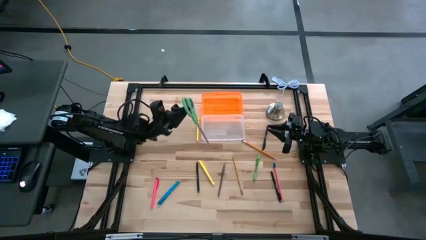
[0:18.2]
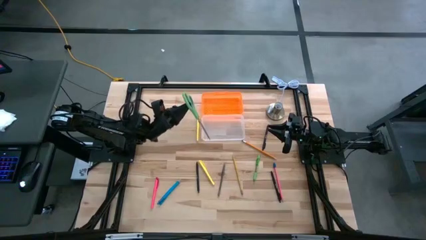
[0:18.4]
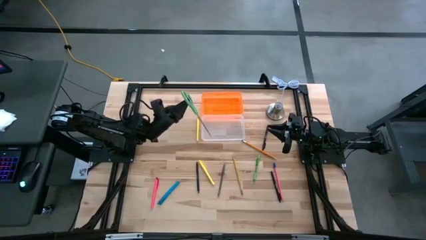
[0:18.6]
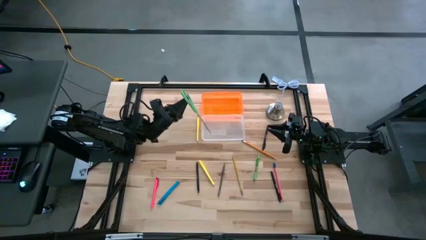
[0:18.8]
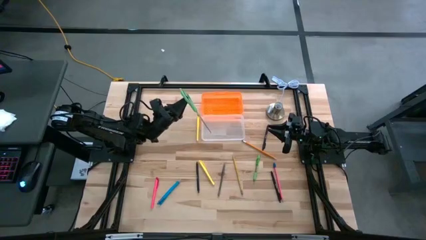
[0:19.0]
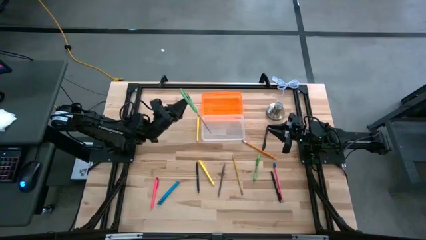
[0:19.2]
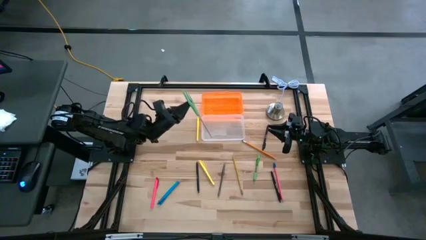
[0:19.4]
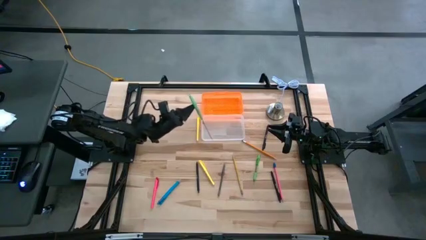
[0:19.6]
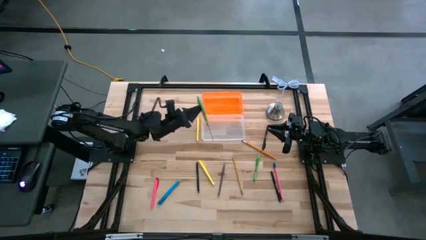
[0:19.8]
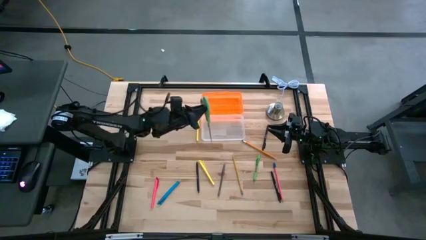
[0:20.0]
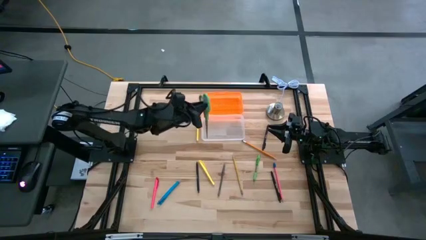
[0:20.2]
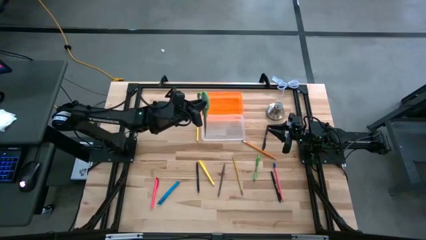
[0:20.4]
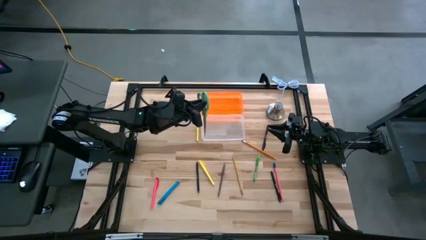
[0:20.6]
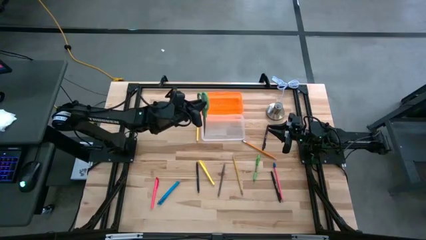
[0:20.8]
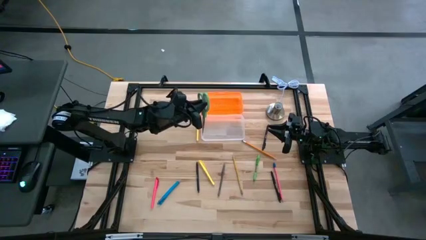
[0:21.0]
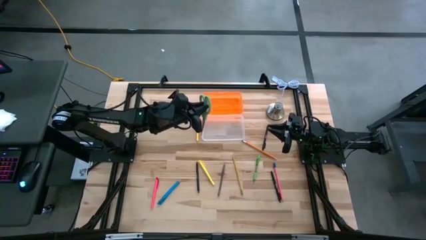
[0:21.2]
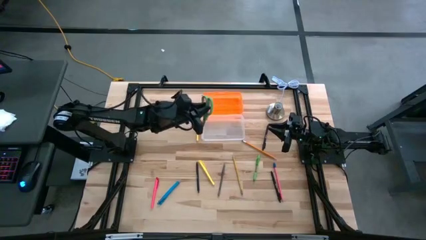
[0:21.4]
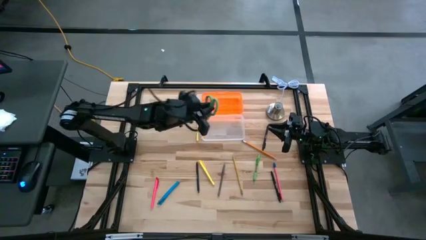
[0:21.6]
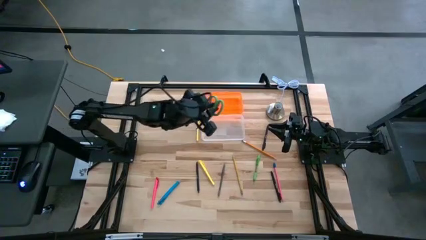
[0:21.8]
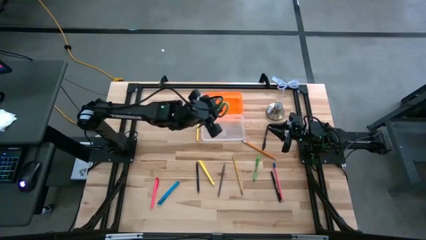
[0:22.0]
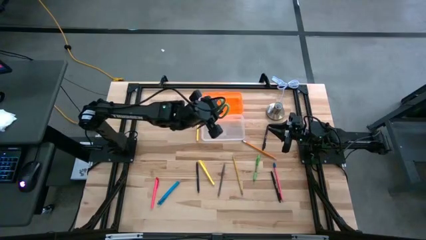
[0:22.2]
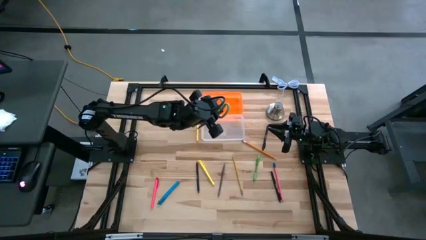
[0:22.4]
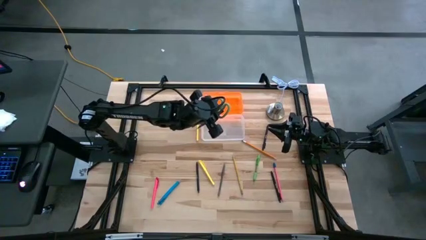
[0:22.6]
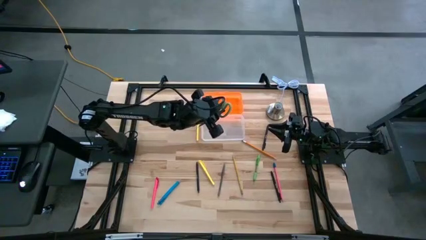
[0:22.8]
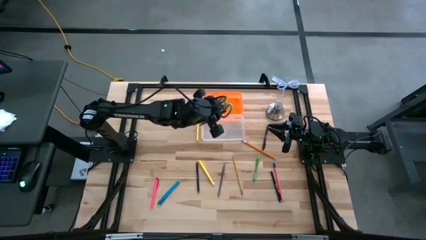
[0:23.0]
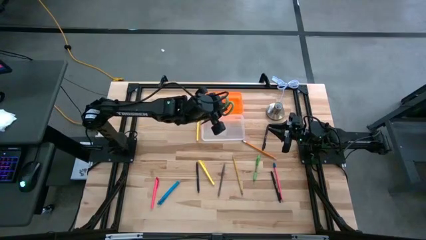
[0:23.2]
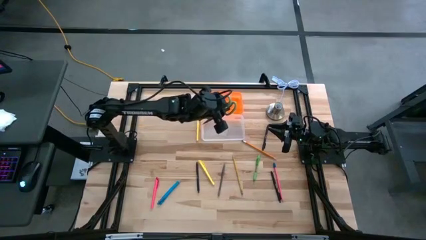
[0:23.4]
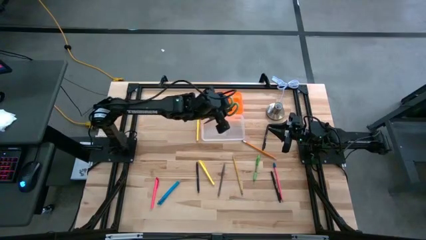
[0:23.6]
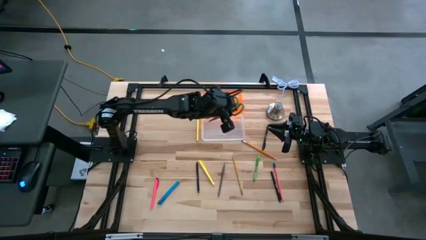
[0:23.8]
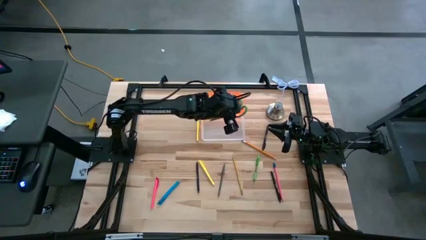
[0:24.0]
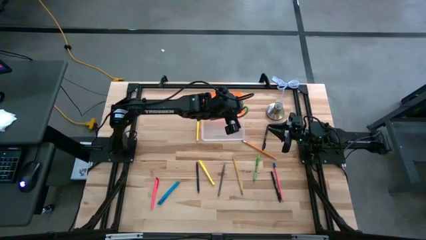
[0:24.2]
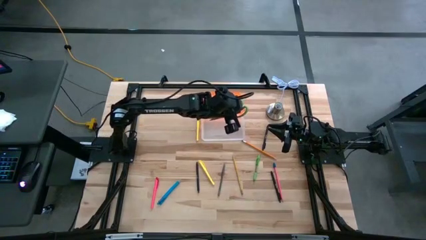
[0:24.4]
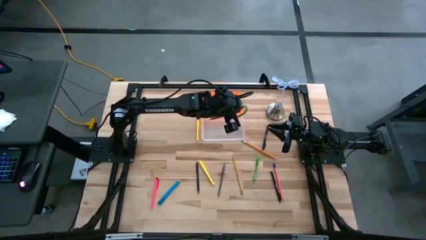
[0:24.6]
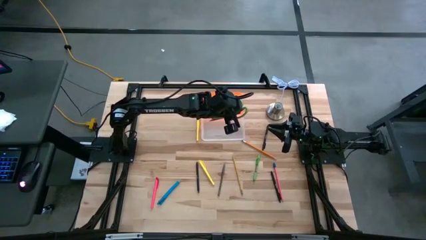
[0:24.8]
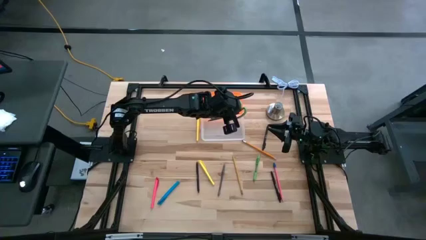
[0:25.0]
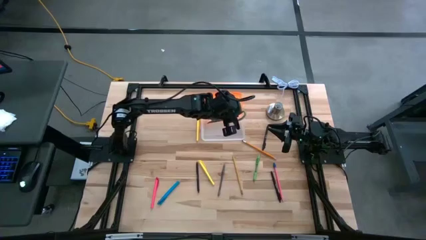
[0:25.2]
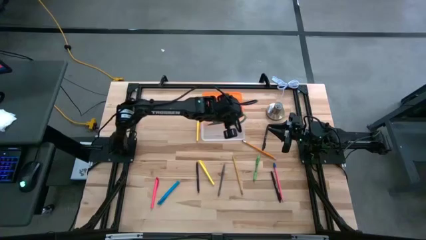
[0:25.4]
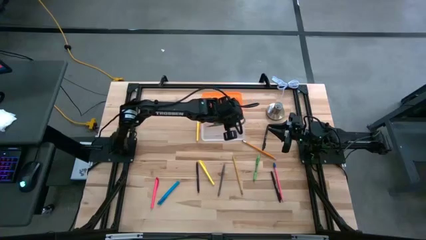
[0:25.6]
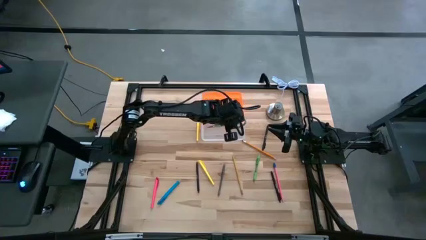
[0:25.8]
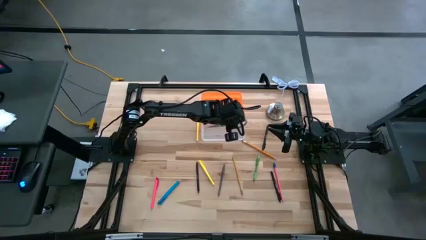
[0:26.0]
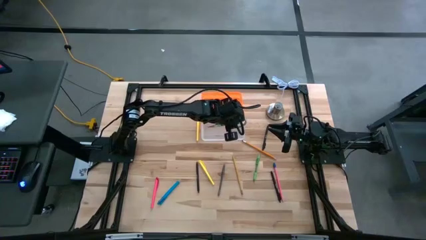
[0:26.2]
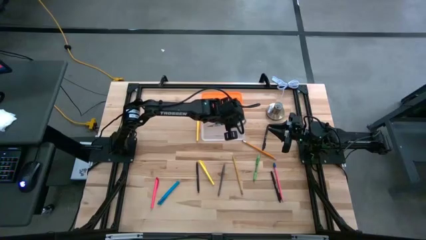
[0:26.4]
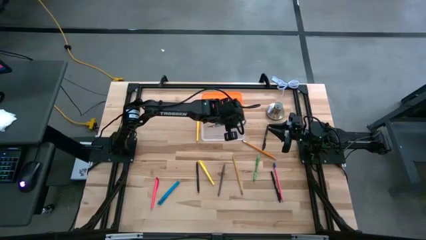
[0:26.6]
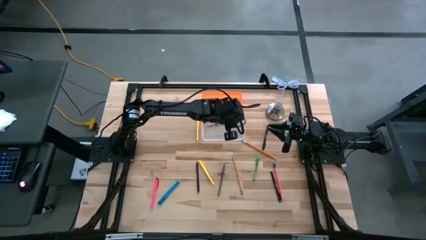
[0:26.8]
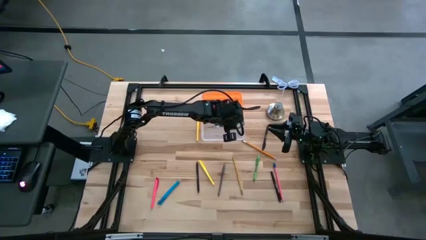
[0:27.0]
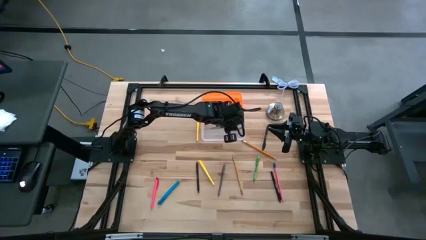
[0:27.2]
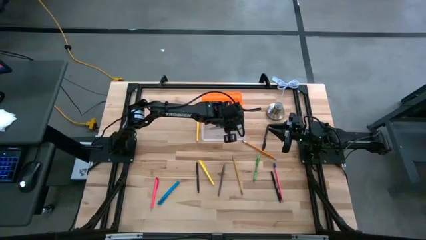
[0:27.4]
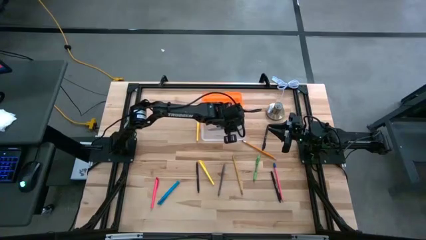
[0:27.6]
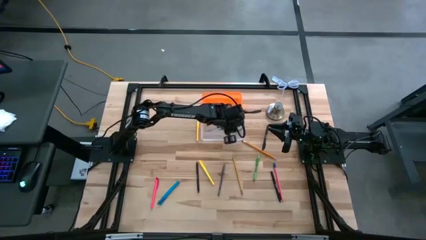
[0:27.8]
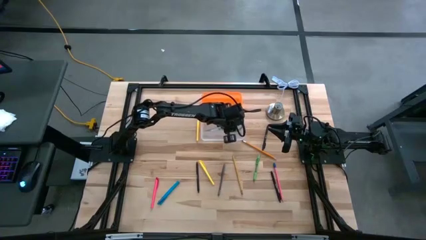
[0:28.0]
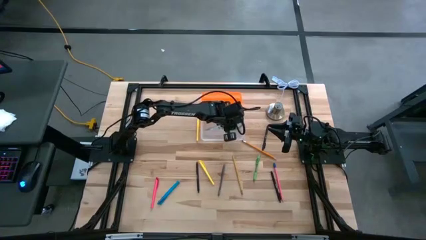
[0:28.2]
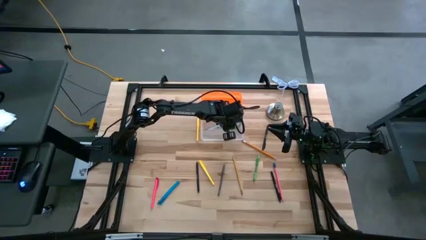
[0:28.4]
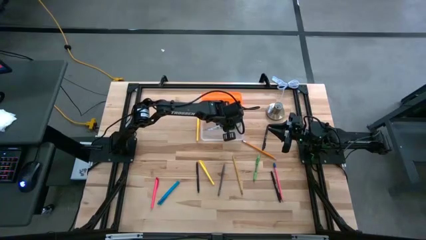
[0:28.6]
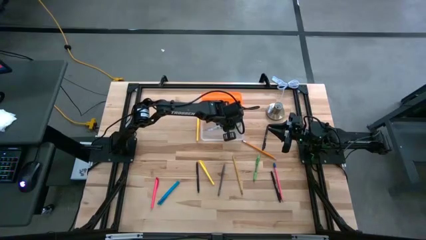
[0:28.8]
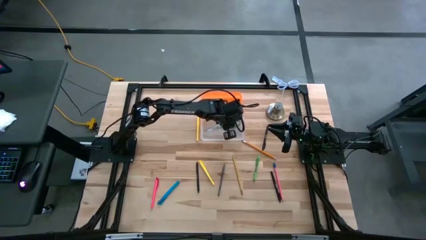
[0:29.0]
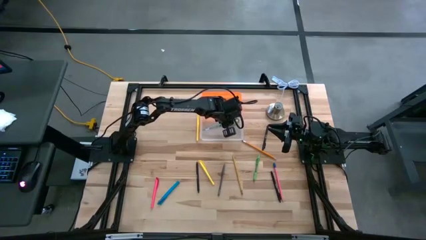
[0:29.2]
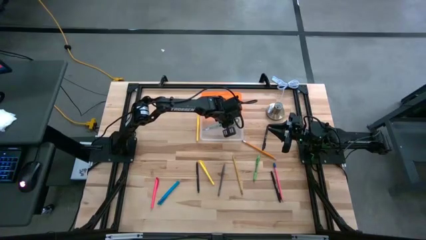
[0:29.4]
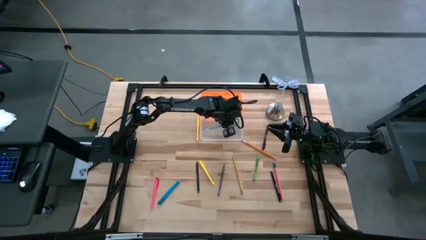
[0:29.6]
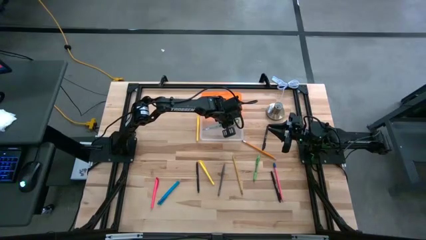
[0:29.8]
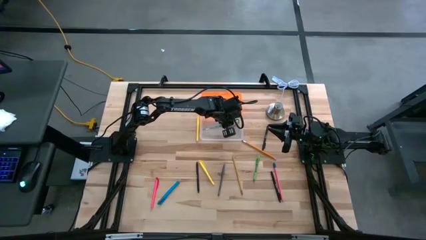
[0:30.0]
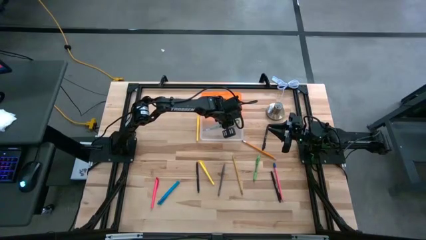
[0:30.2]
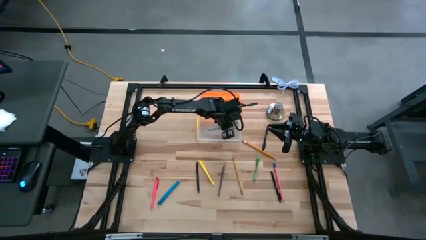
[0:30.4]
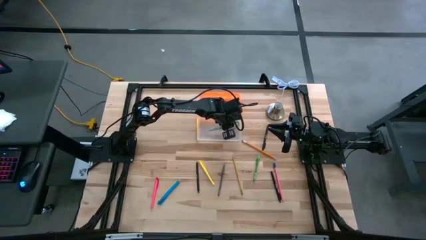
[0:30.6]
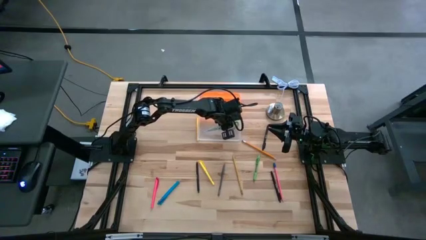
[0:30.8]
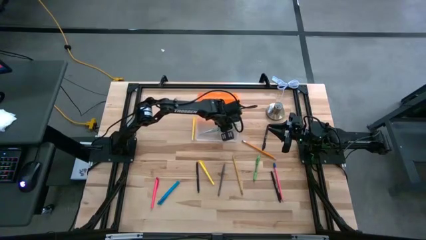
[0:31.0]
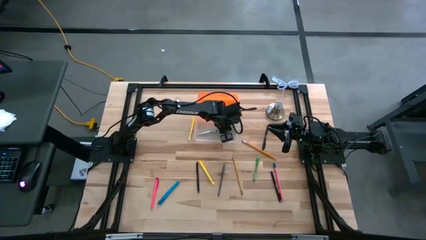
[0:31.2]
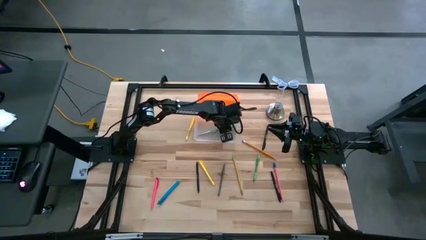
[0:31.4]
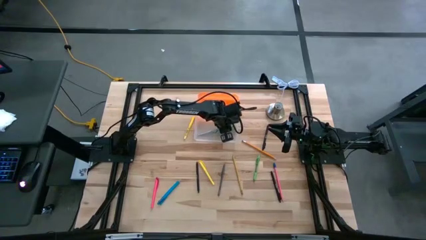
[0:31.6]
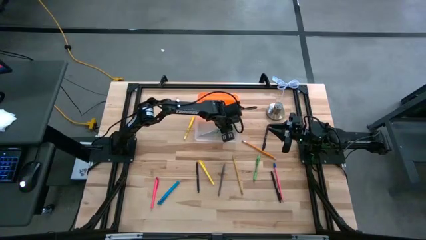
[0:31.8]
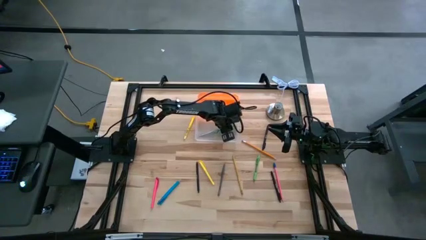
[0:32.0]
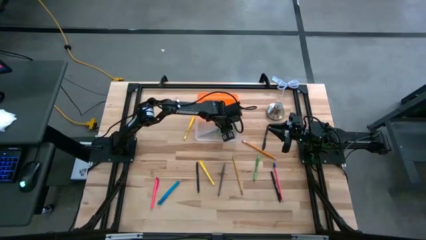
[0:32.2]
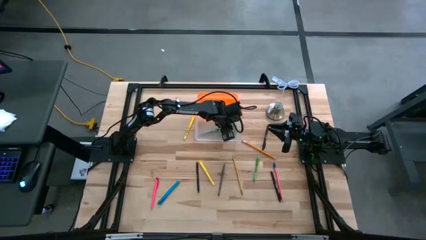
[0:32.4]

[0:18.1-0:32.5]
Task: Pick & place school supplies into a supply box
Put the green scissors into the orange supply box
